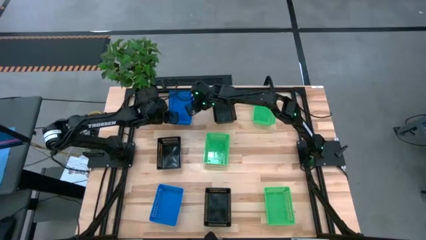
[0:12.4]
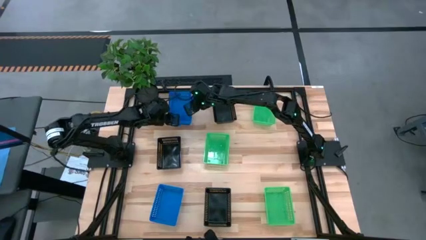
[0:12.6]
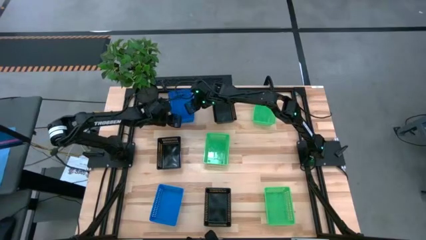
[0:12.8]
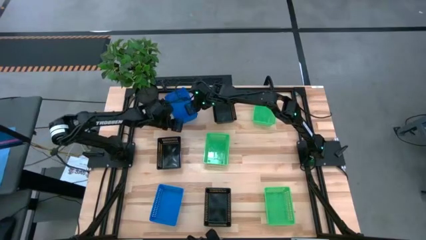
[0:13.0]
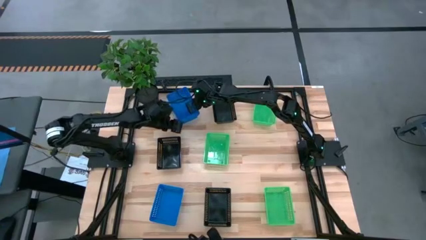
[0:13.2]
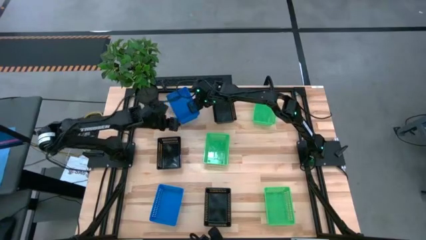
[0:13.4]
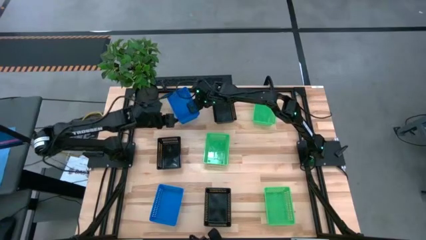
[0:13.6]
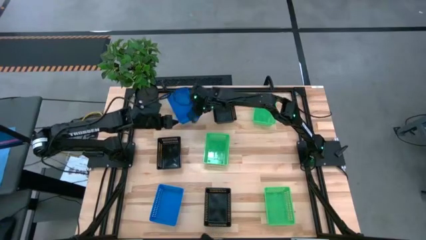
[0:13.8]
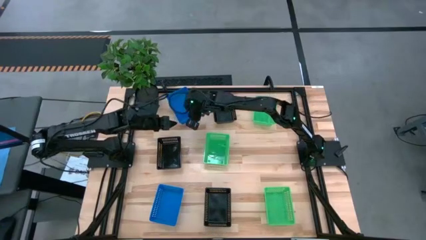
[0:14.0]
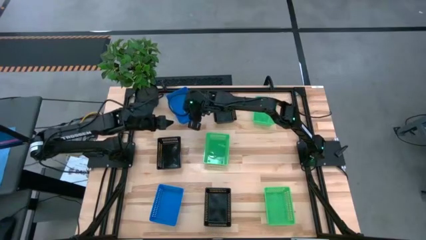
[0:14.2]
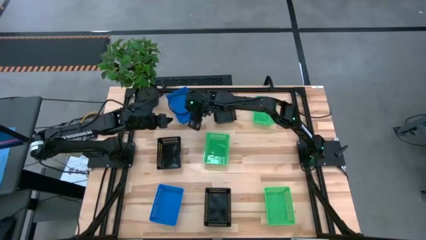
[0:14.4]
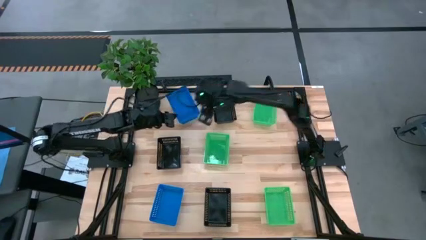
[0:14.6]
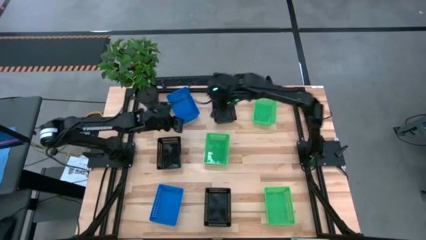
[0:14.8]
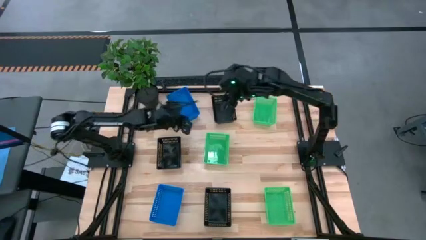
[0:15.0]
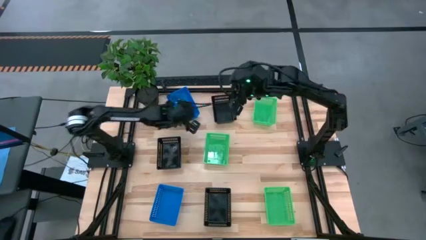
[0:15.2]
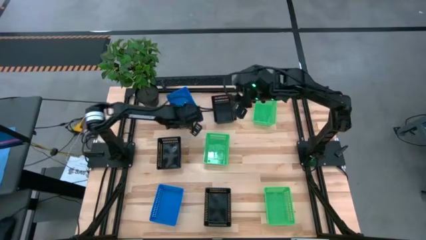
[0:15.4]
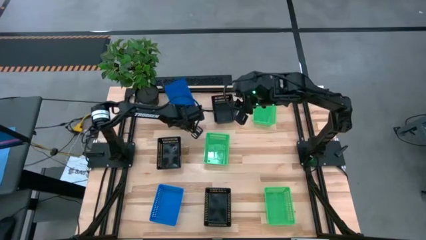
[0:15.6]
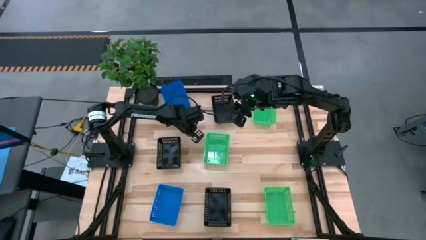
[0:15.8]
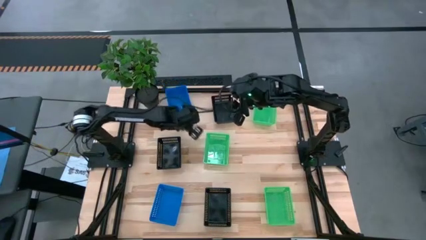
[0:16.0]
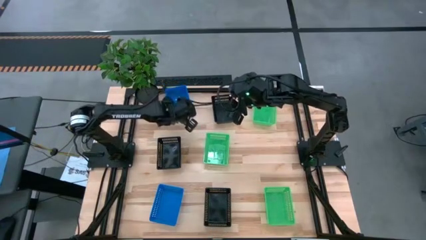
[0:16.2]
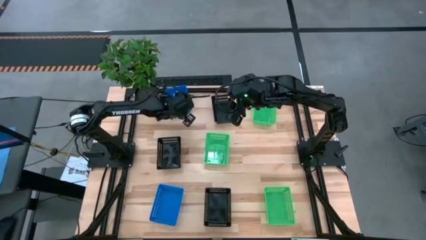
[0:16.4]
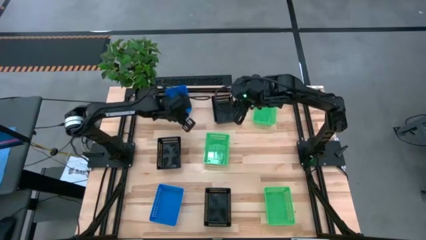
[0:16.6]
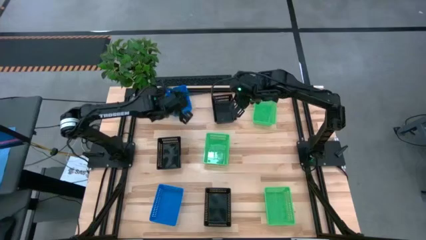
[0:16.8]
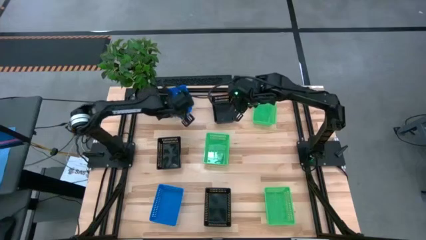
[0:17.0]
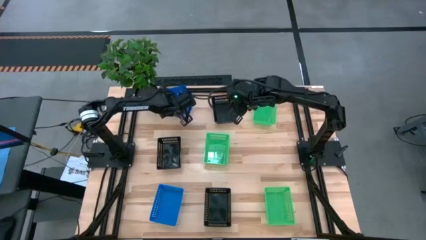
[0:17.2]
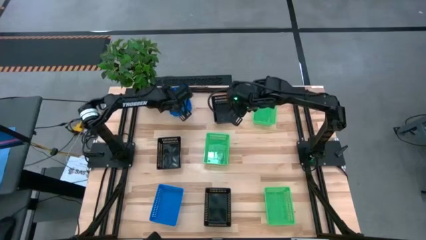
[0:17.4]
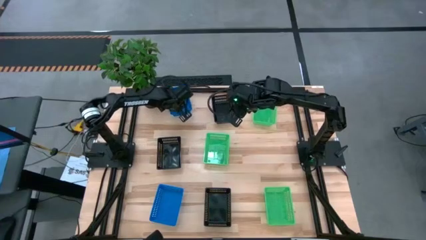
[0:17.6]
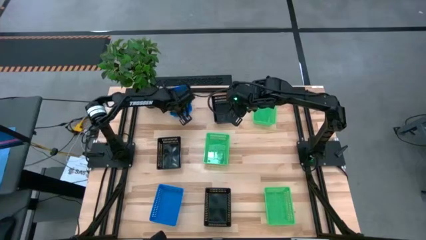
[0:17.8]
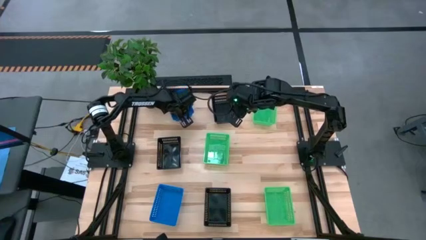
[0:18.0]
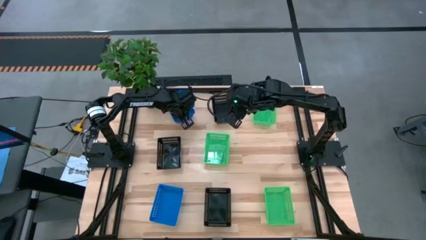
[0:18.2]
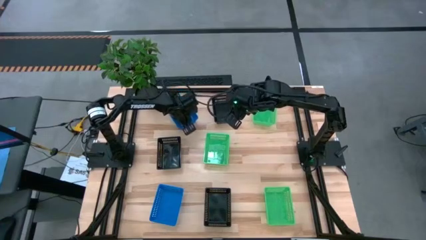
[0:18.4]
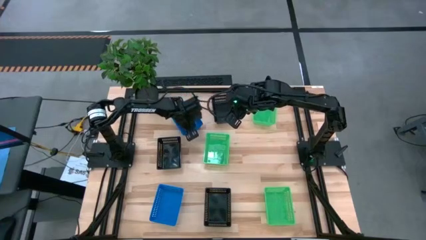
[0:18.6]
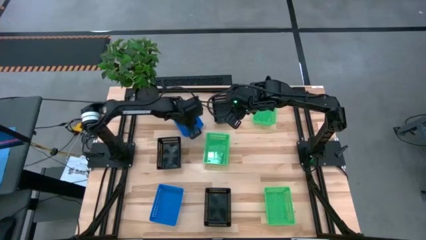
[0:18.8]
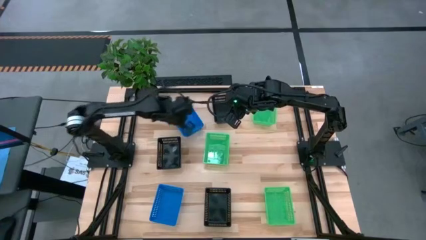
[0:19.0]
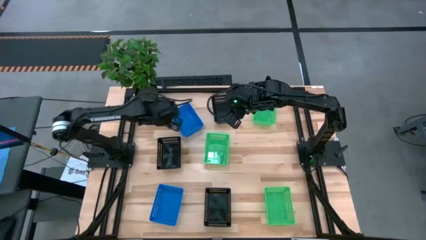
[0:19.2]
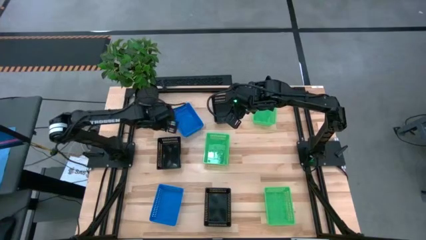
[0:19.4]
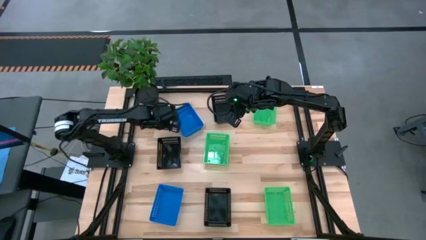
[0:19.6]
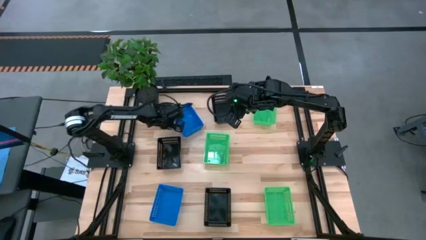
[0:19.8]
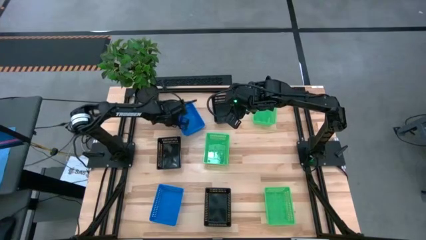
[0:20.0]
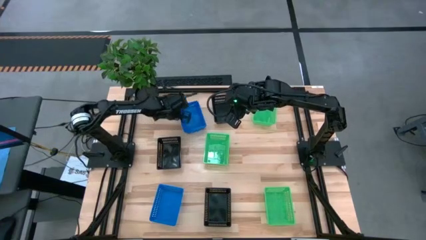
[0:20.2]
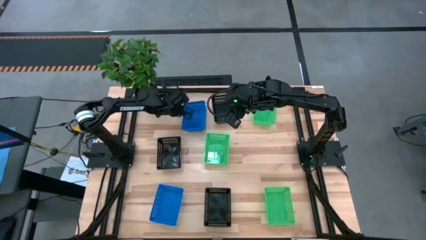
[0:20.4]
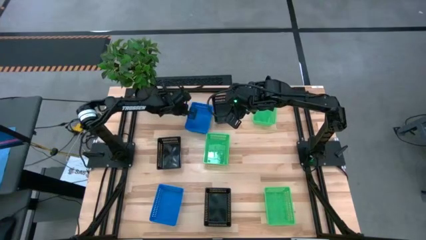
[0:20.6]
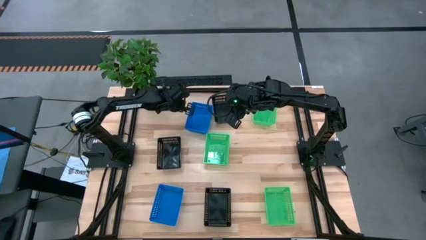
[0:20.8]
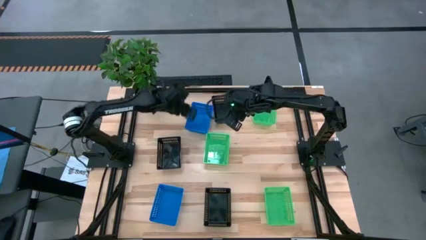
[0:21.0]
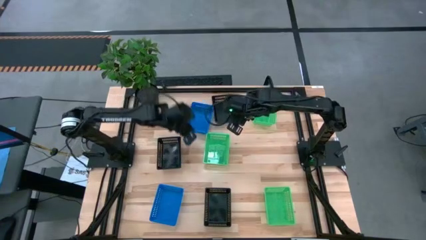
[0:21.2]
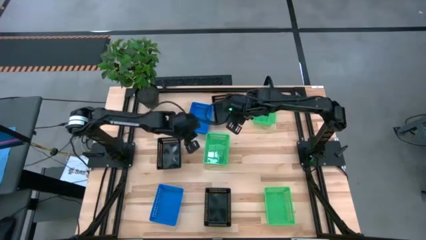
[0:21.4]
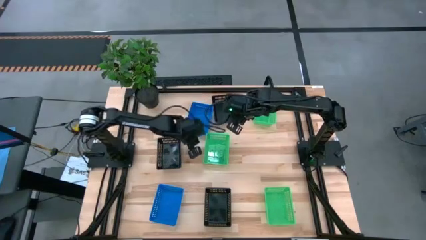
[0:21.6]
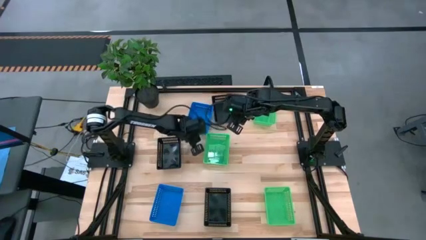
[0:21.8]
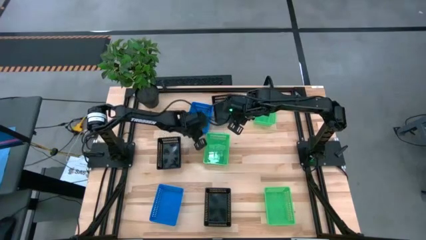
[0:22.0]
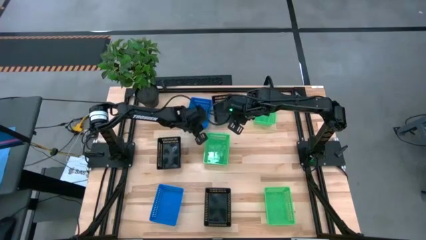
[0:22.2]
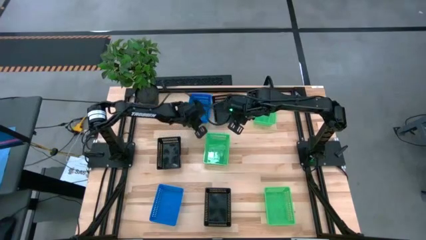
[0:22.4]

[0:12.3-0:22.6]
Stack the middle blue bin on the top blue bin

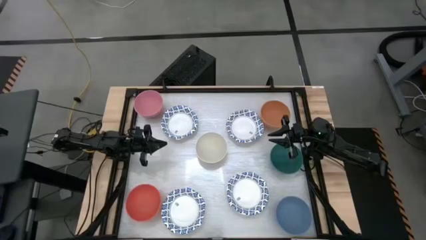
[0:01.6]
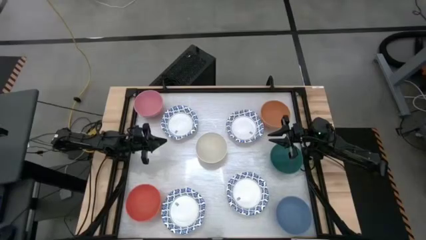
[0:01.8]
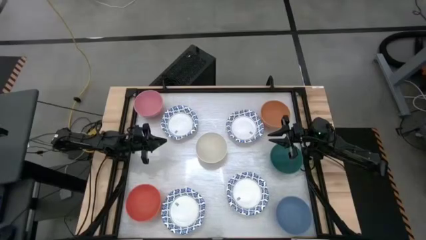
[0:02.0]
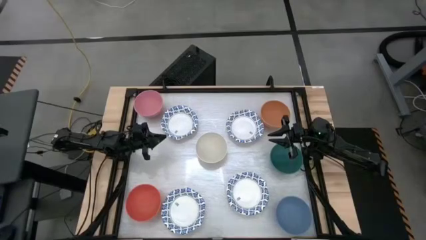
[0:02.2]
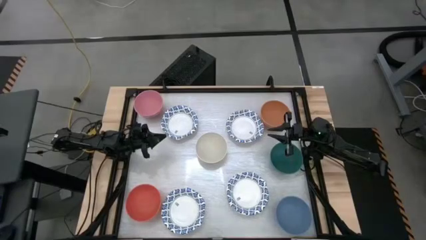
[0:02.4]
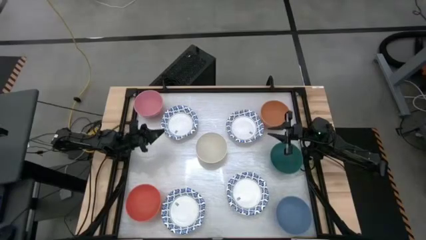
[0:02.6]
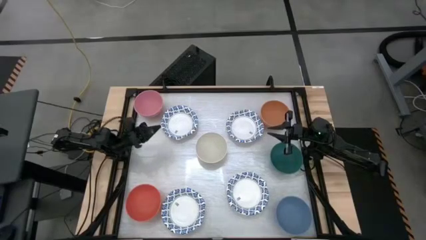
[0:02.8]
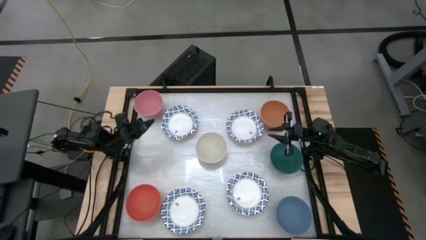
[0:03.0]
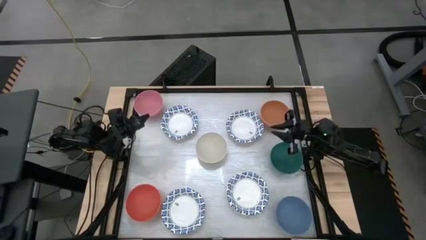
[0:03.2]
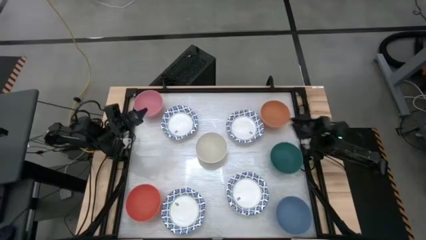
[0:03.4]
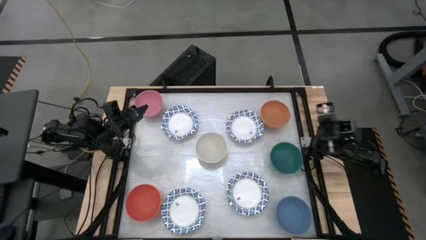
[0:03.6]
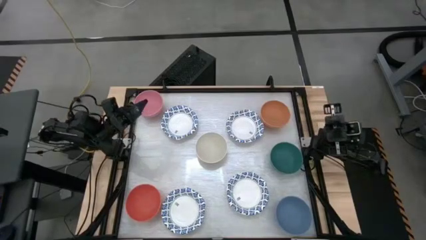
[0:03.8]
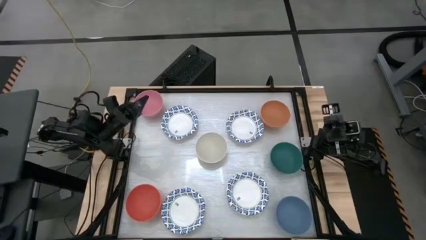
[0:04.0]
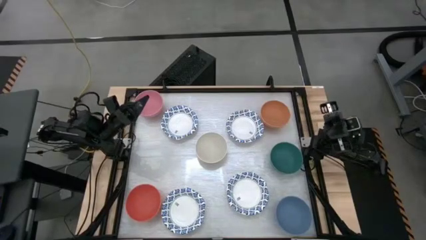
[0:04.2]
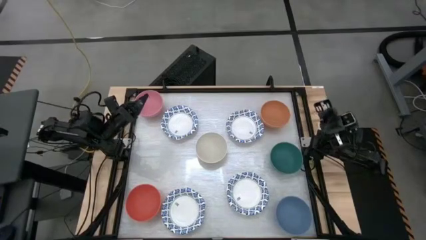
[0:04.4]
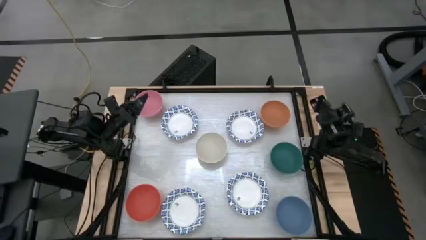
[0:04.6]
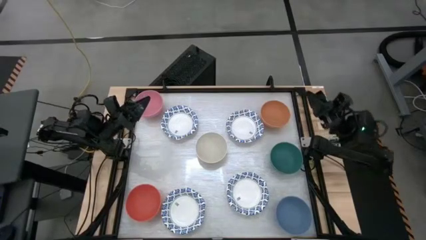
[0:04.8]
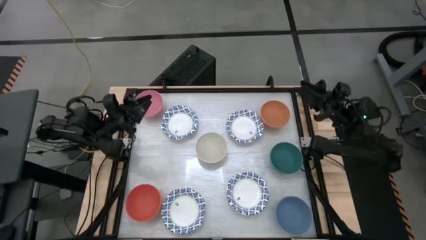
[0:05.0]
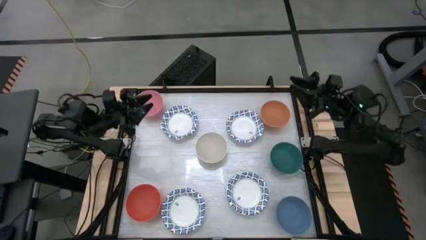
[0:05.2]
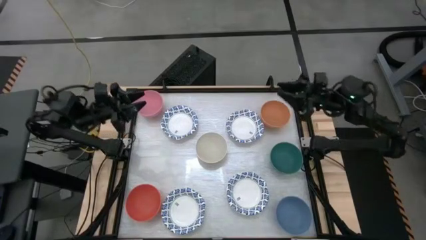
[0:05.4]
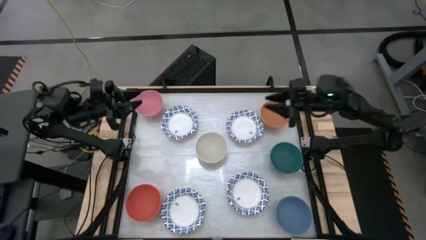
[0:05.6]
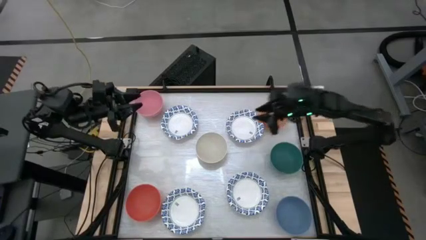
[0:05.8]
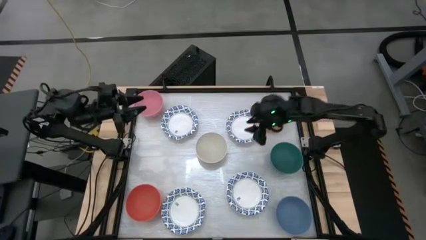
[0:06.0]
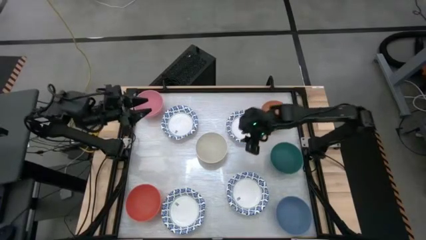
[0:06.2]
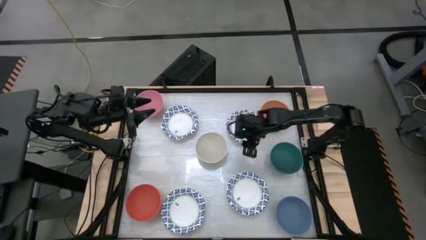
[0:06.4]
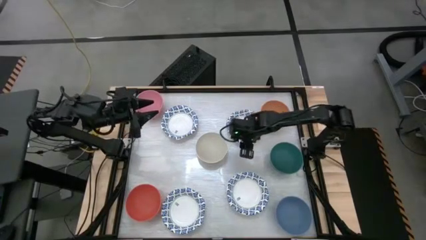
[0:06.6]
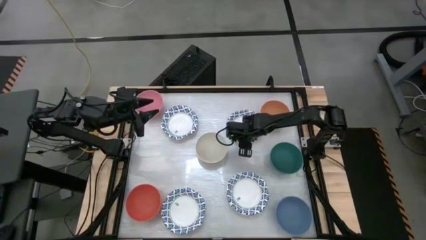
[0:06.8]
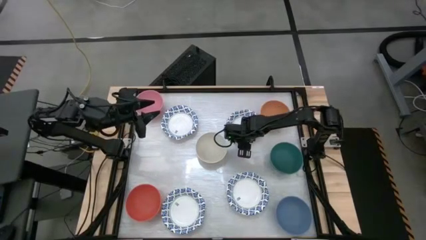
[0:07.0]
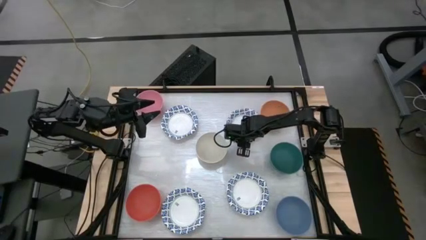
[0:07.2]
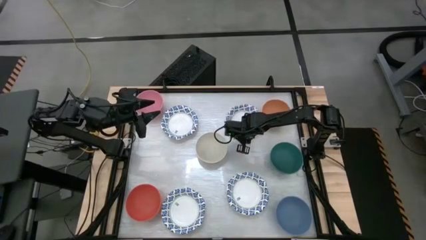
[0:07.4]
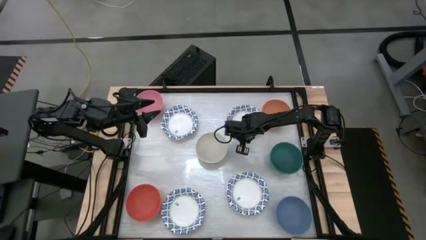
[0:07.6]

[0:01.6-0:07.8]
Stack the white patterned bowl on top of the white patterned bowl
